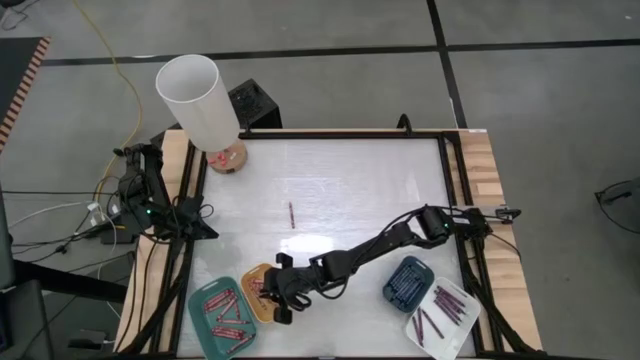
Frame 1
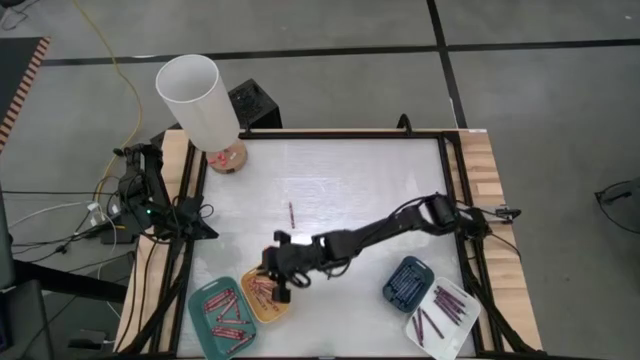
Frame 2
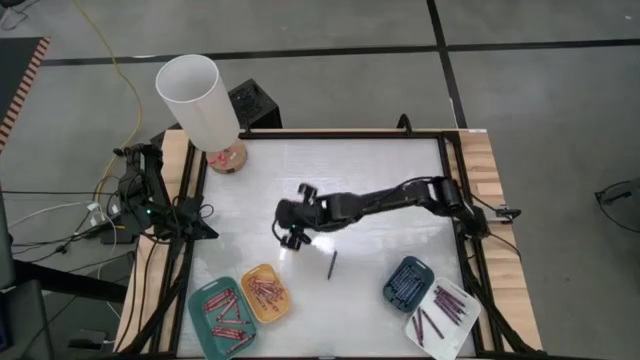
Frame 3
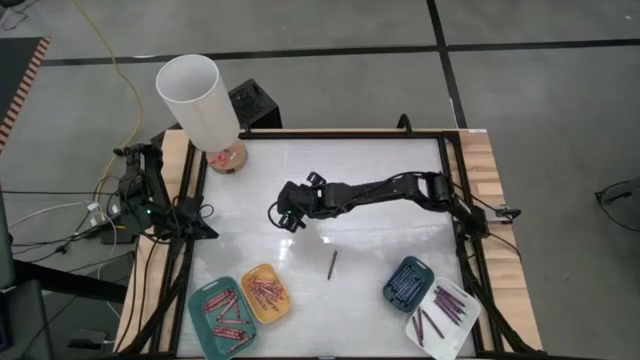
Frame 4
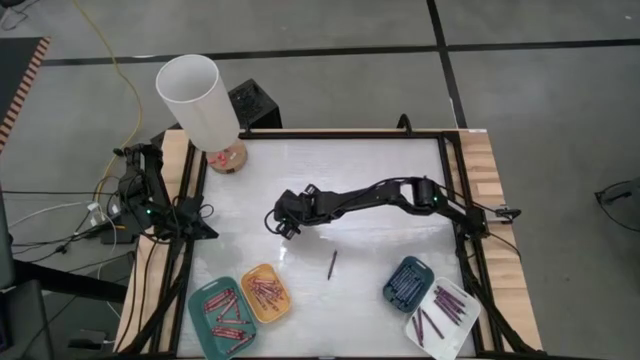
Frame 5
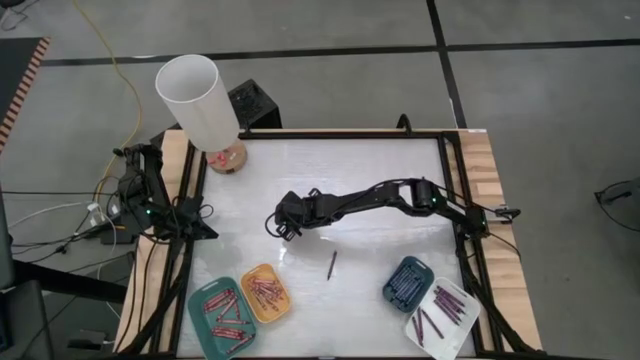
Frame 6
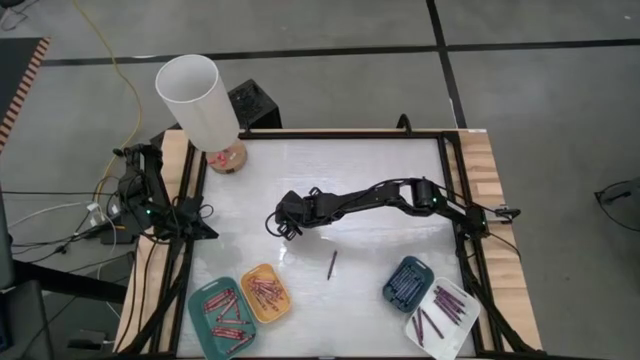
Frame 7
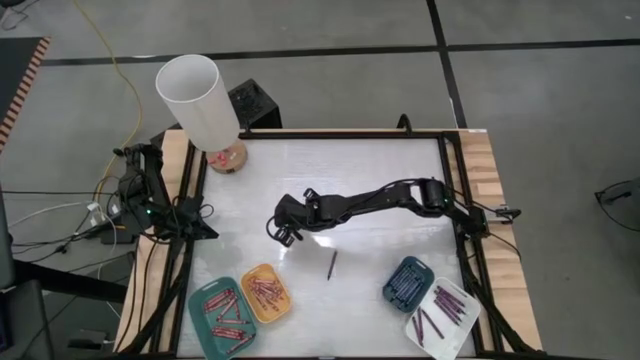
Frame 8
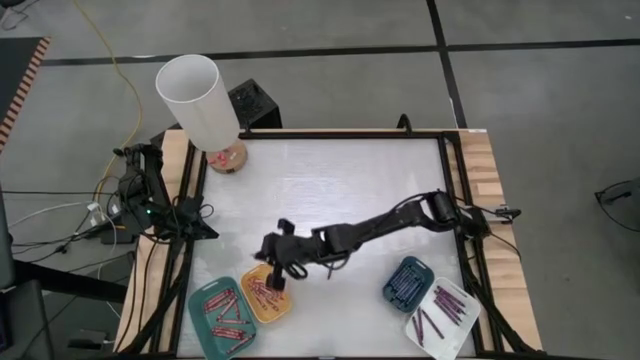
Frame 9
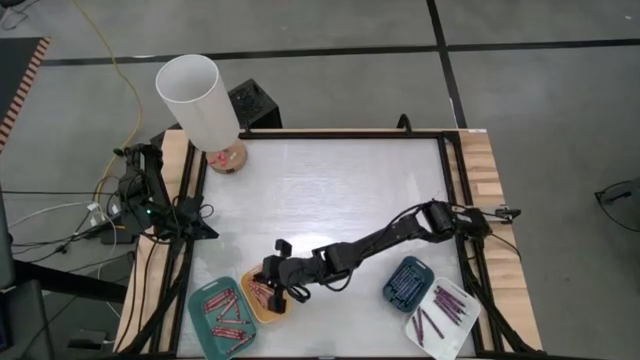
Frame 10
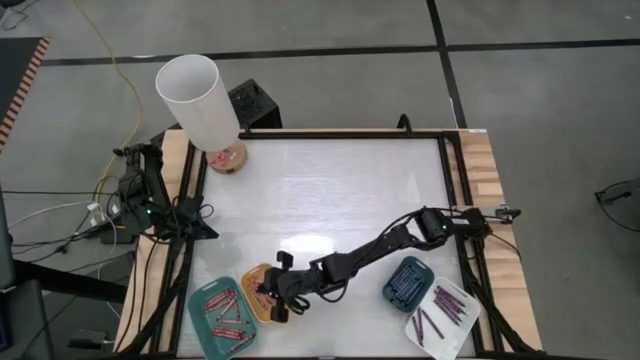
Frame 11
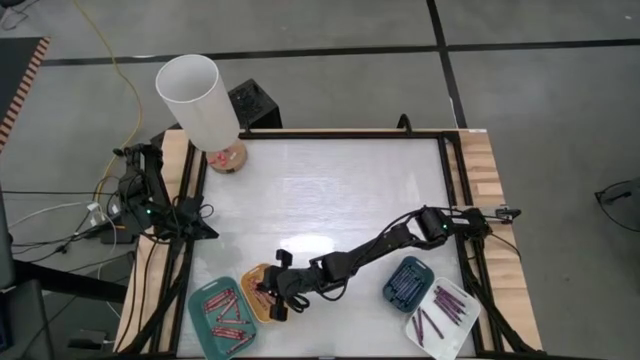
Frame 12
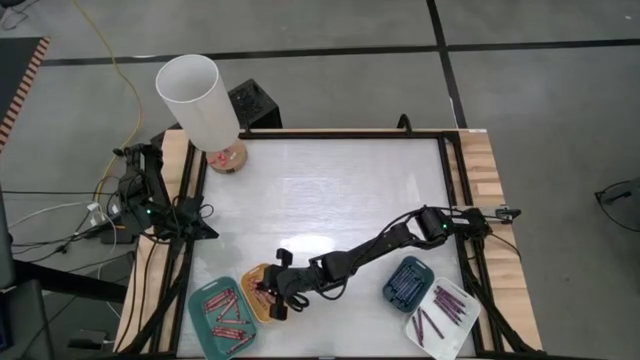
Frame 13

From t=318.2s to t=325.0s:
Task: Sort crayons
Put the pink crayon into the yellow bin

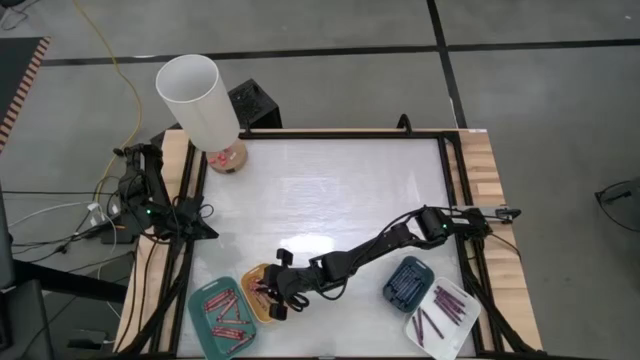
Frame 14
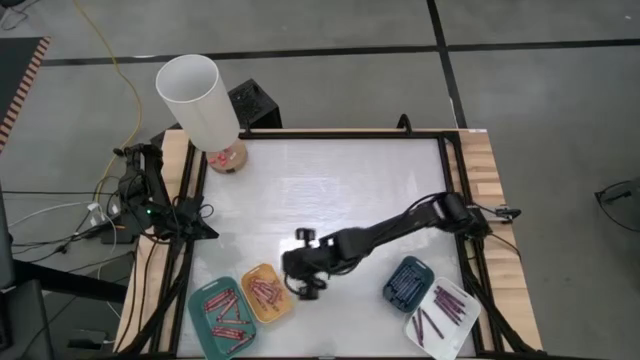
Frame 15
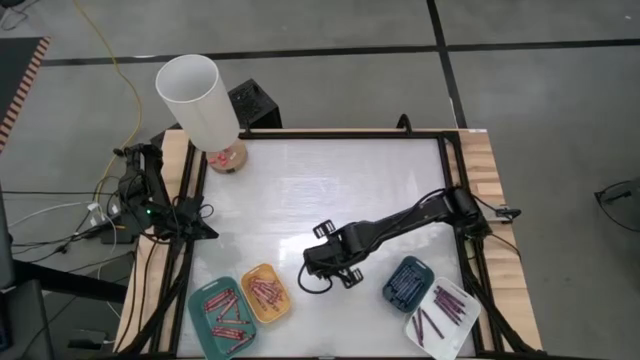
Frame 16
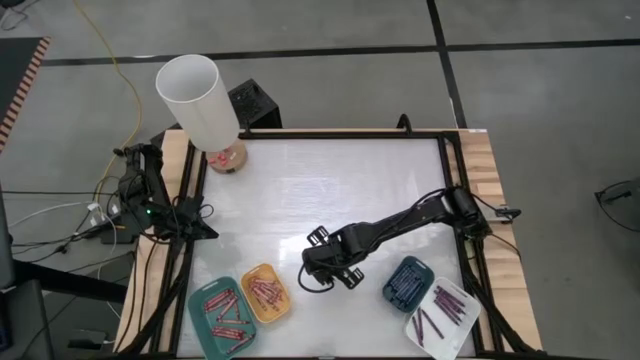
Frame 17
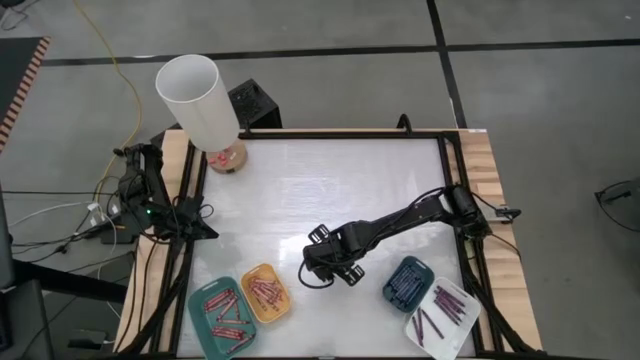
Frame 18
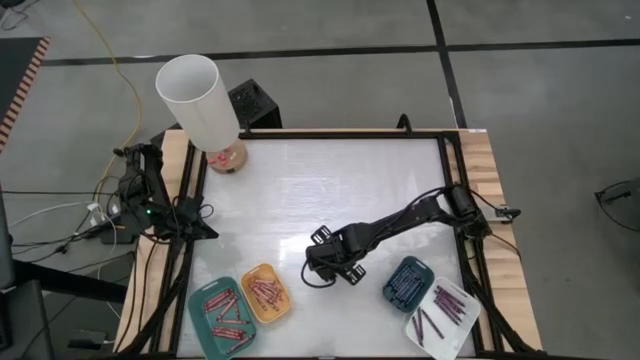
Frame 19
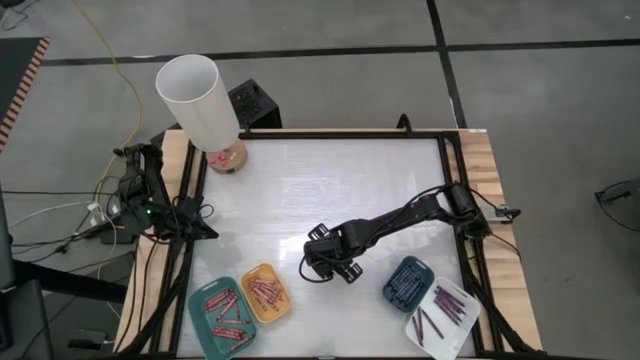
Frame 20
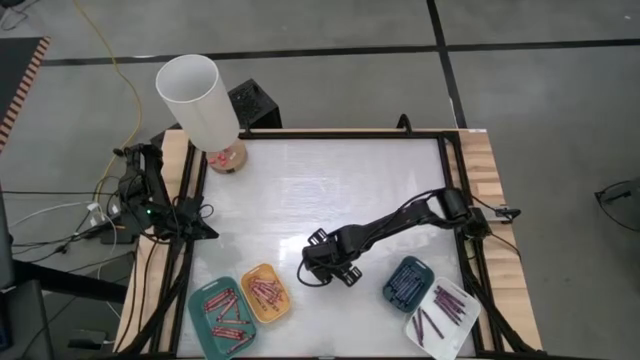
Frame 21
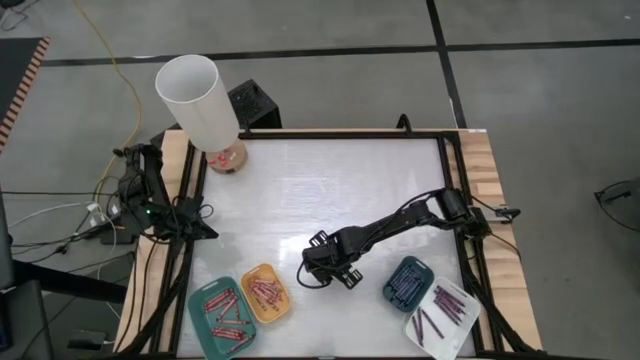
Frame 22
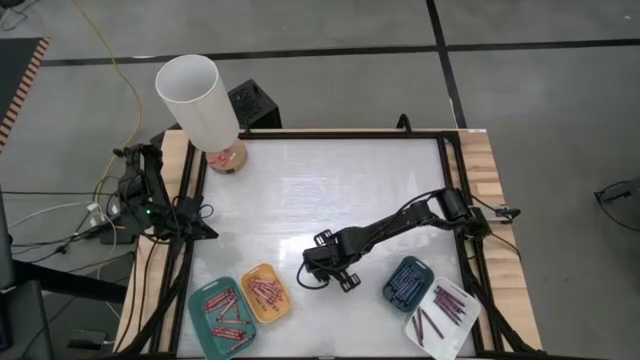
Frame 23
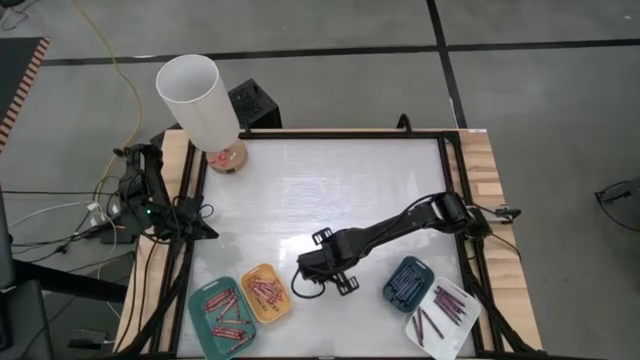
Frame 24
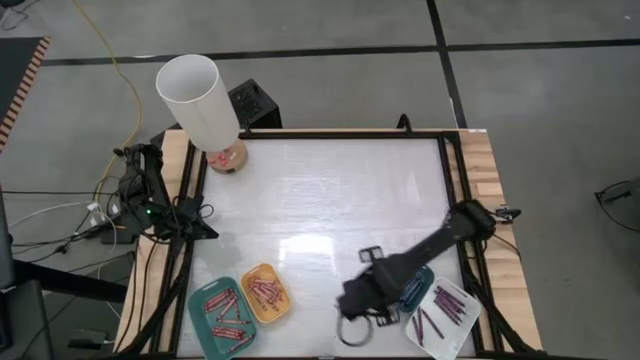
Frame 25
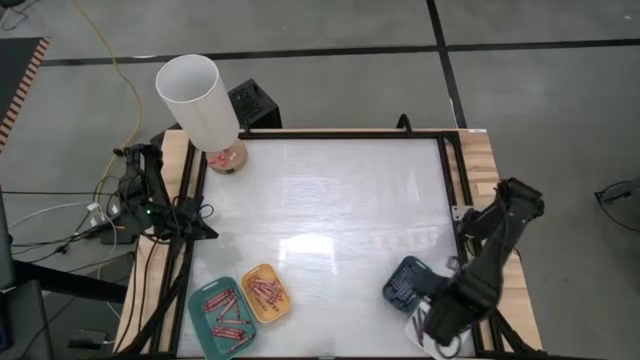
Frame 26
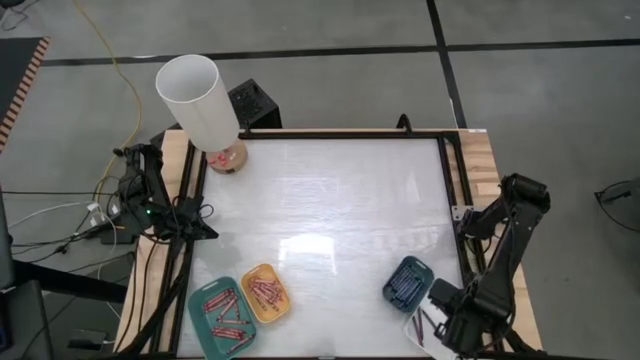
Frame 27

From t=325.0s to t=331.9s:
Put the purple crayon into the white bin

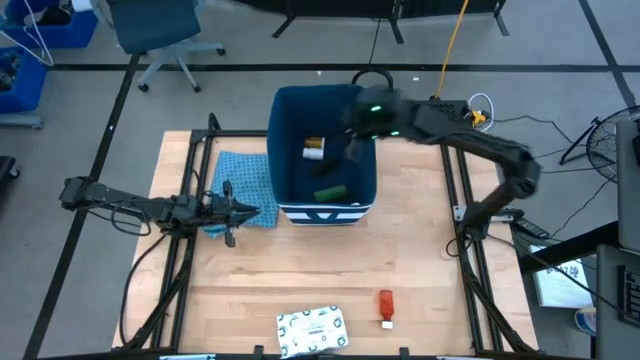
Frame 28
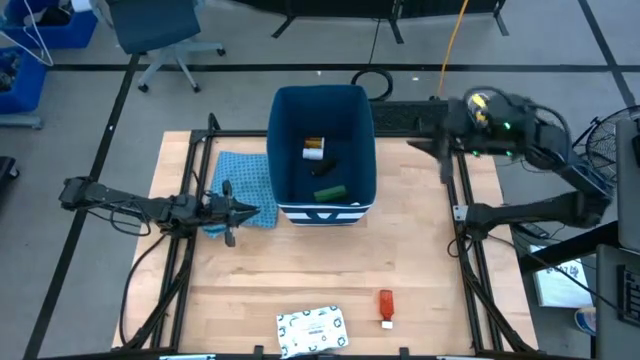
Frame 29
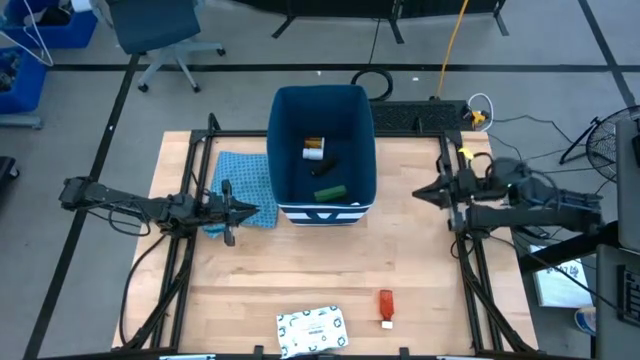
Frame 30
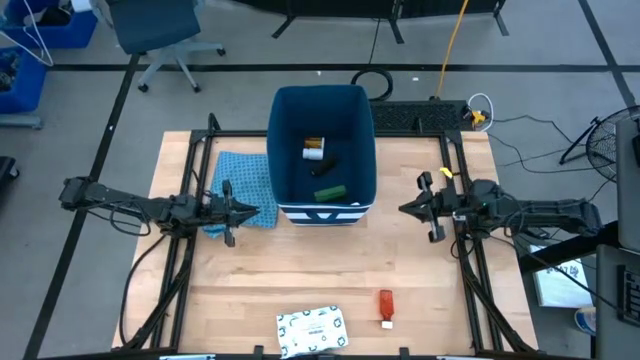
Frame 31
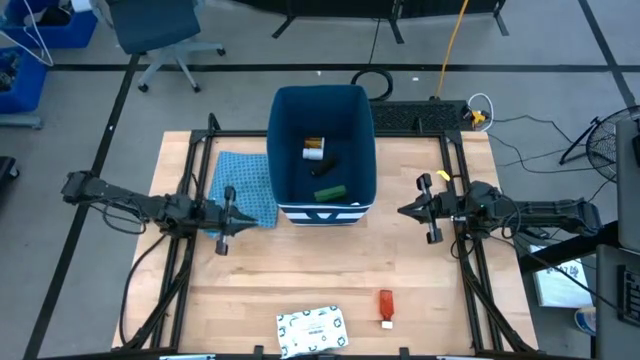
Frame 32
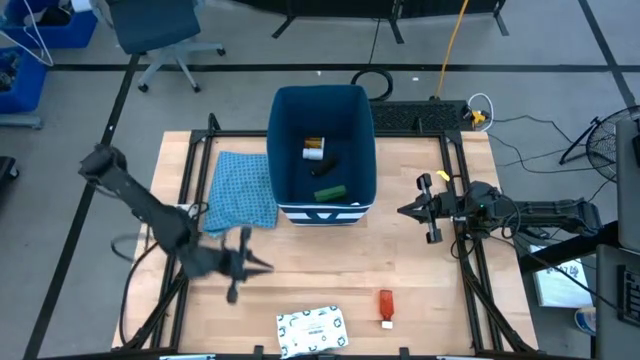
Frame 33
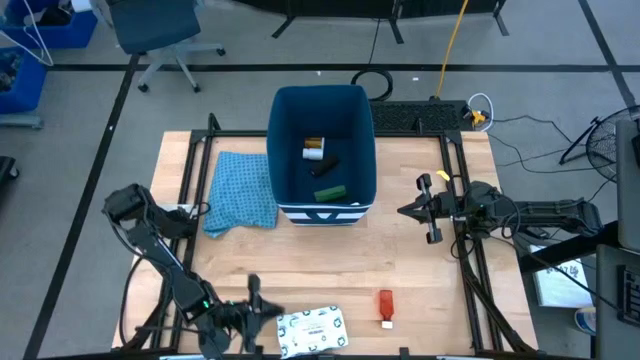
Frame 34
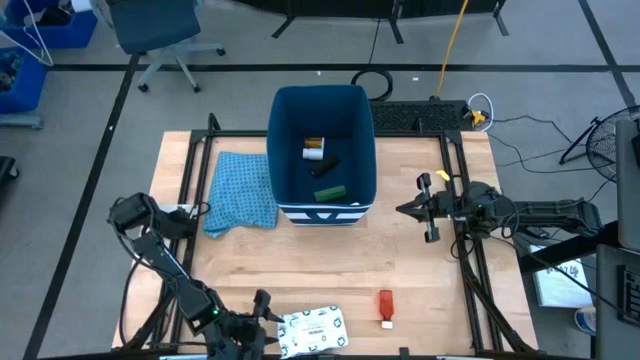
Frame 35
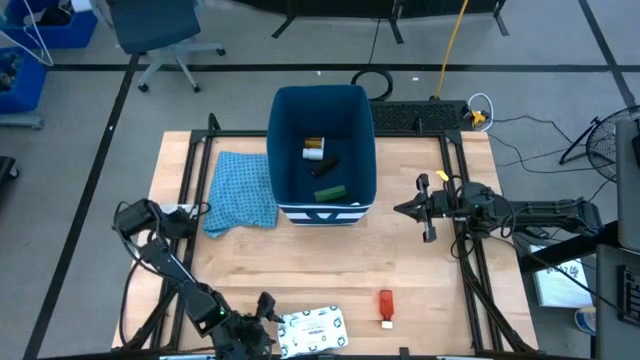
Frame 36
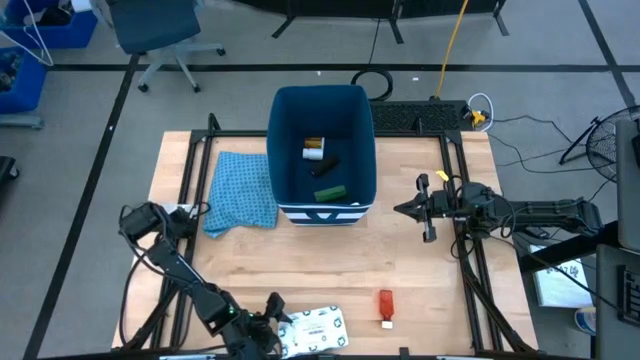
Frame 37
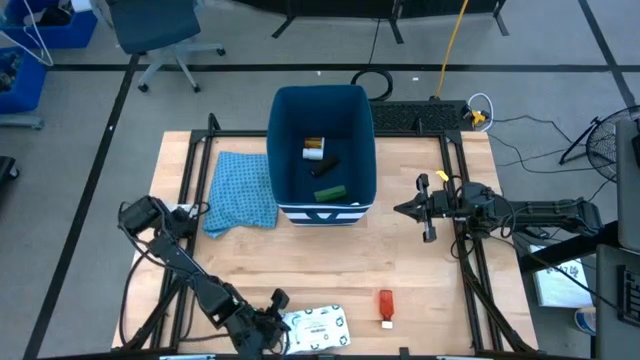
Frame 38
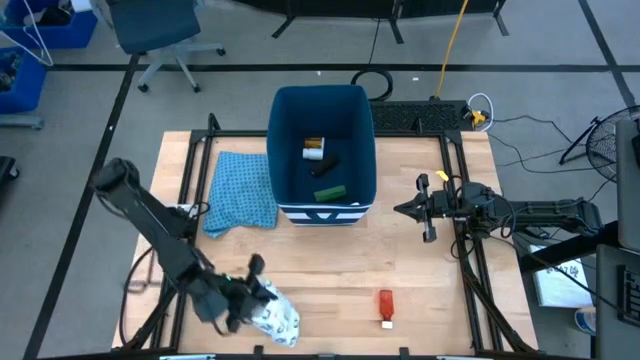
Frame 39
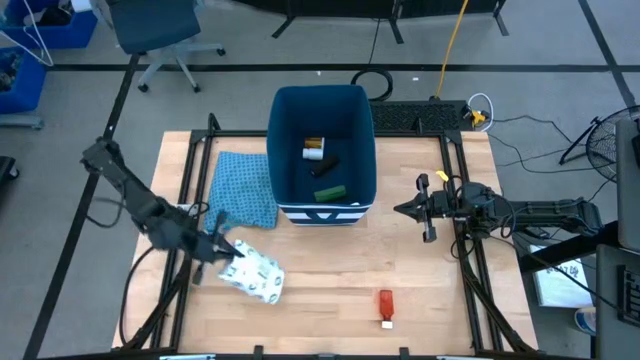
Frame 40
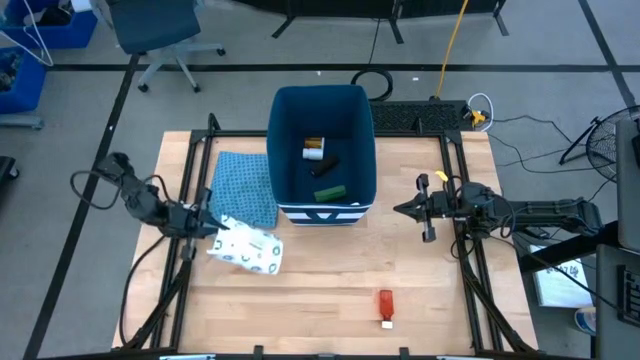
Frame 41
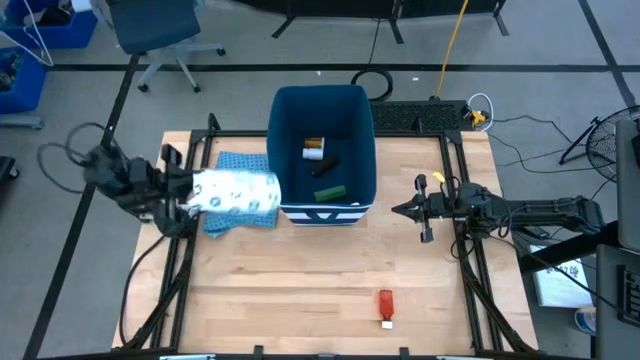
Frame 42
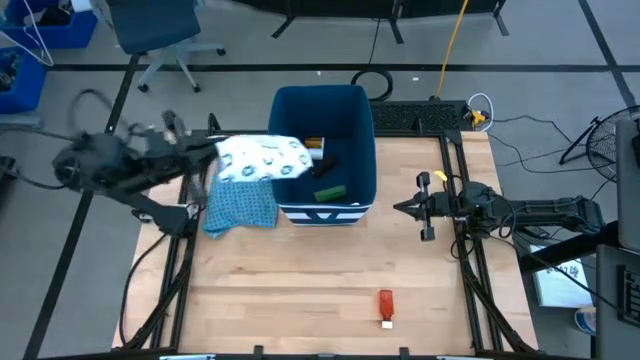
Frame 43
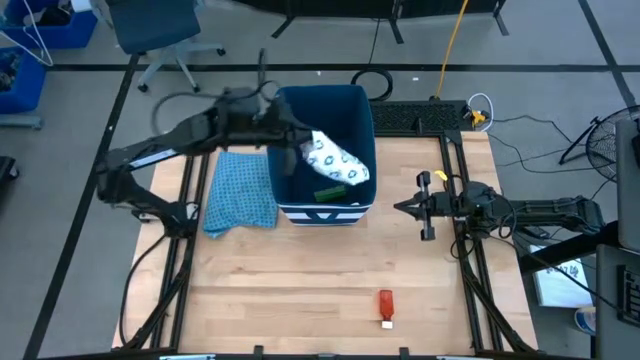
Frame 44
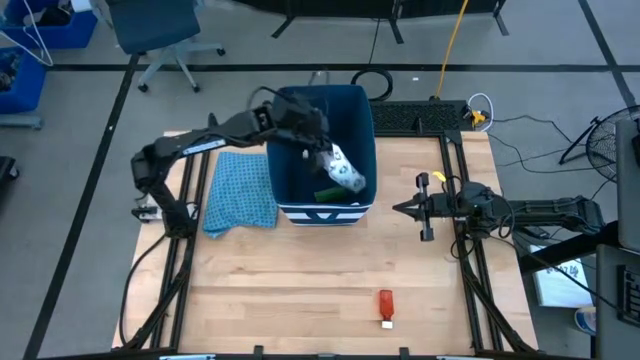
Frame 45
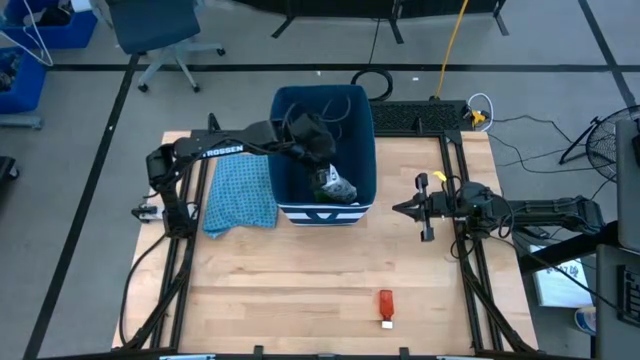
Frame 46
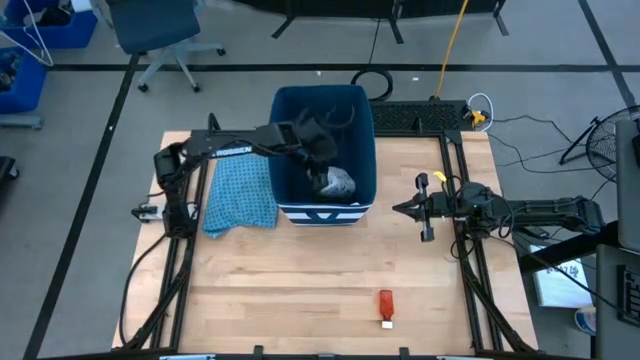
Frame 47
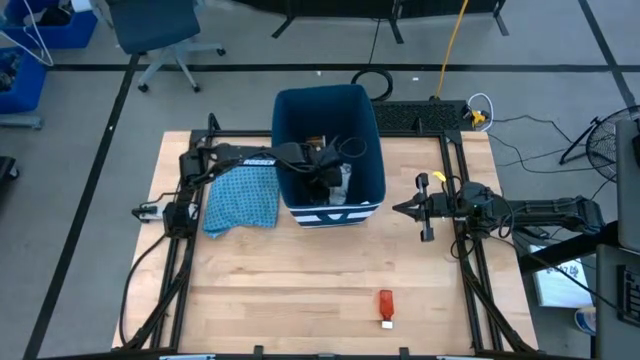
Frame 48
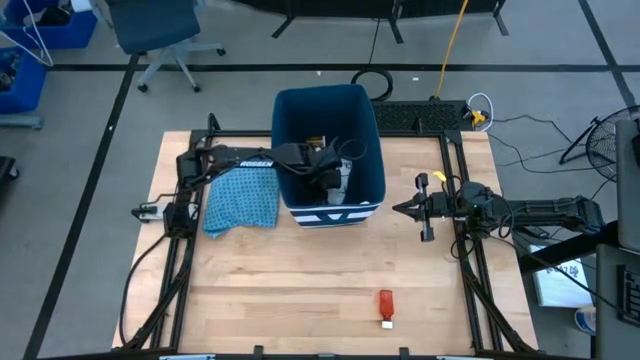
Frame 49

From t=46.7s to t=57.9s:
Task: Pick & place medical supplies in basket/bin
Put the white mailer bag into the blue bin
